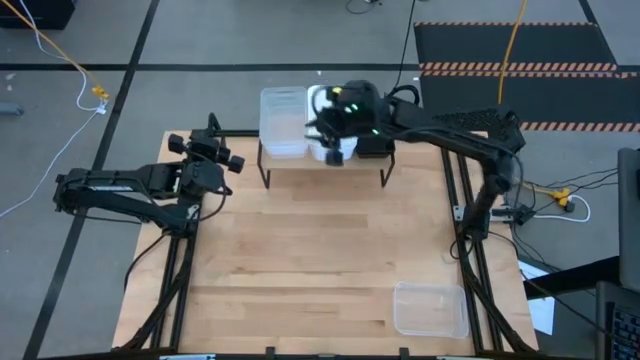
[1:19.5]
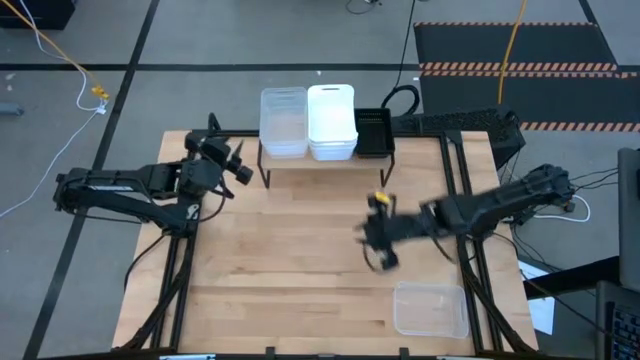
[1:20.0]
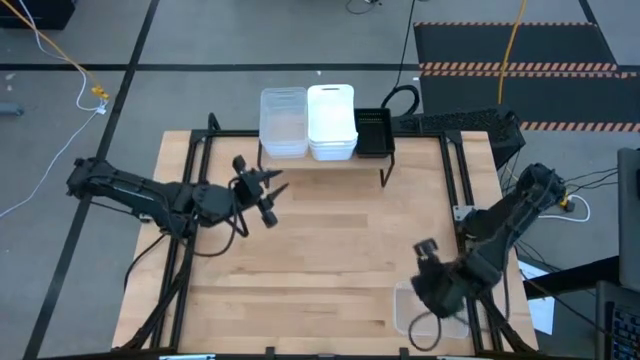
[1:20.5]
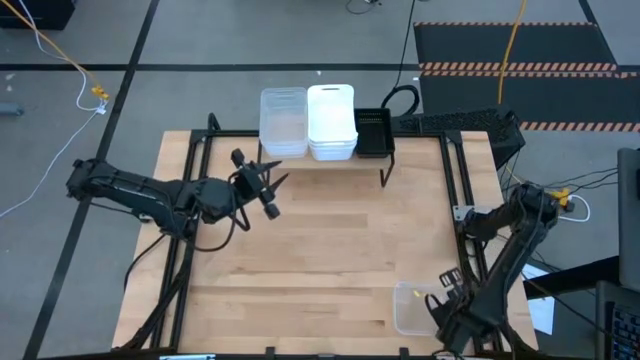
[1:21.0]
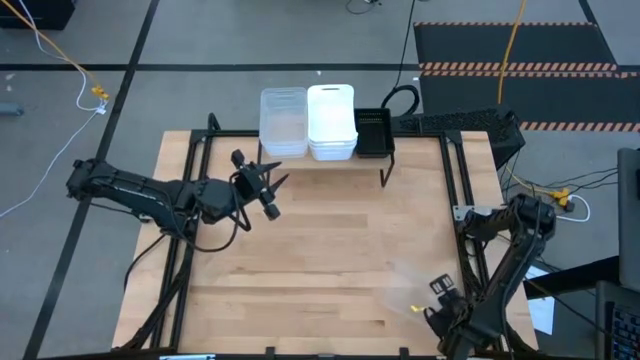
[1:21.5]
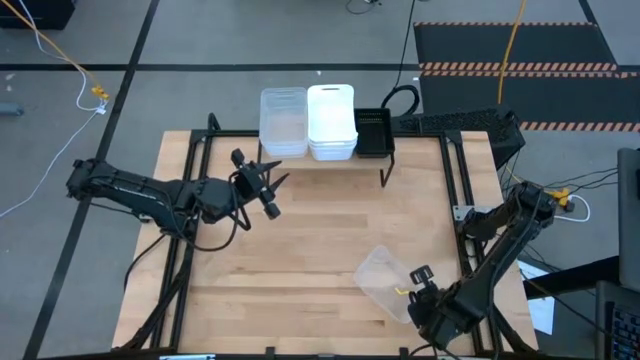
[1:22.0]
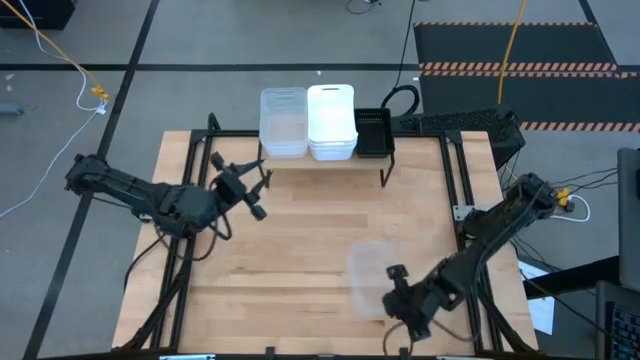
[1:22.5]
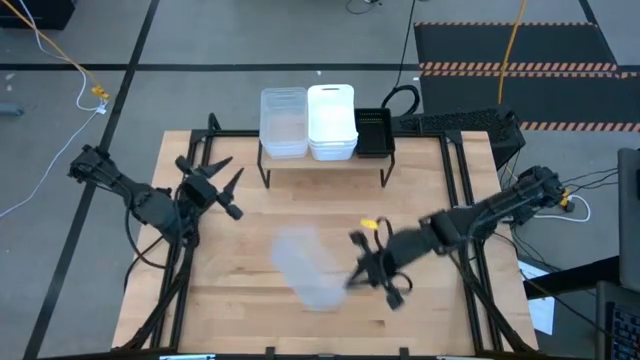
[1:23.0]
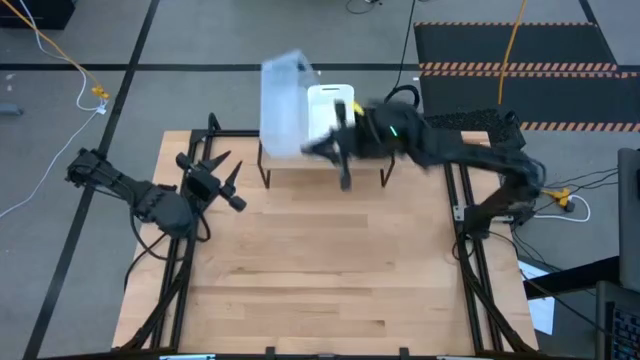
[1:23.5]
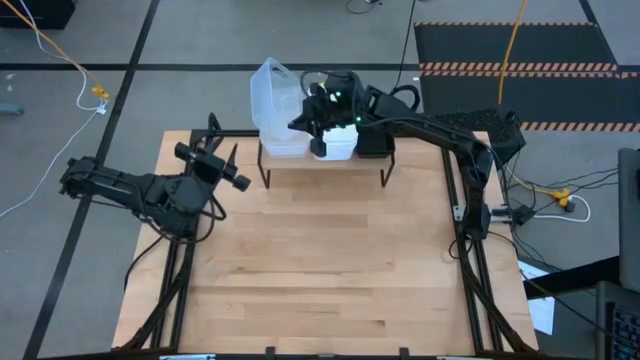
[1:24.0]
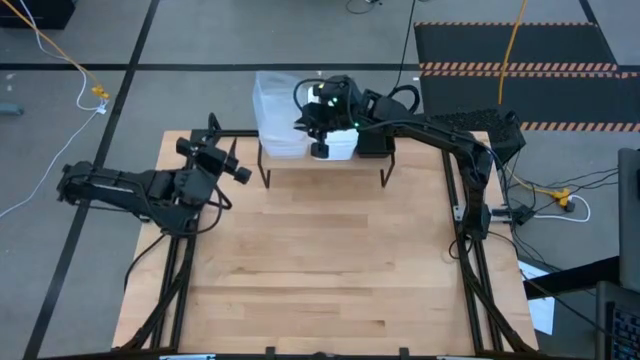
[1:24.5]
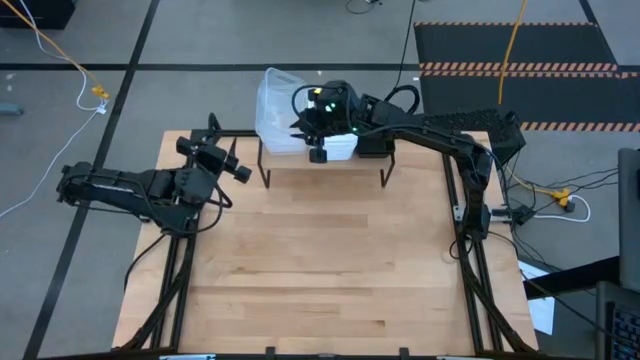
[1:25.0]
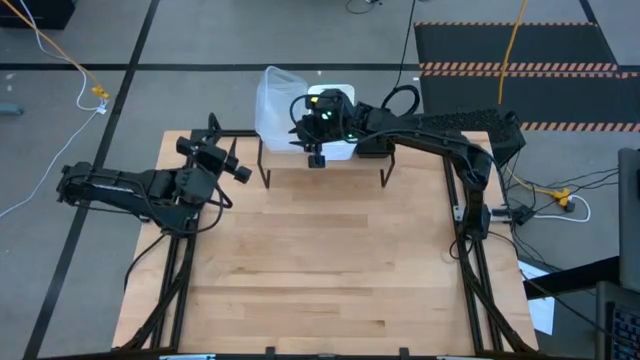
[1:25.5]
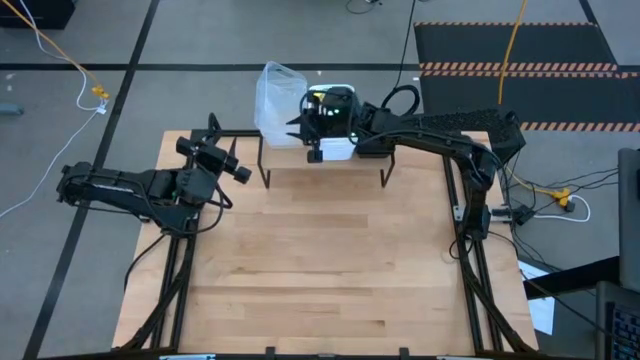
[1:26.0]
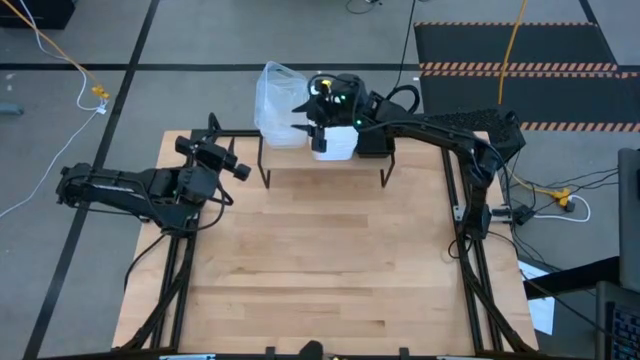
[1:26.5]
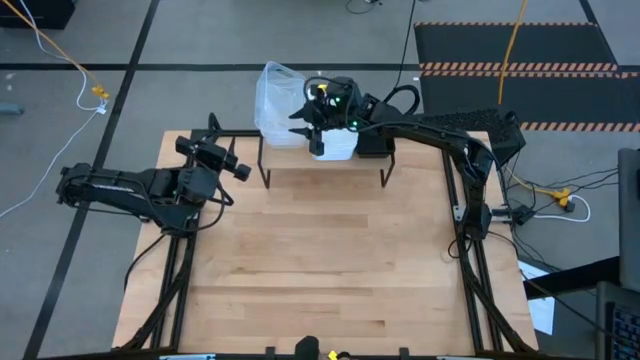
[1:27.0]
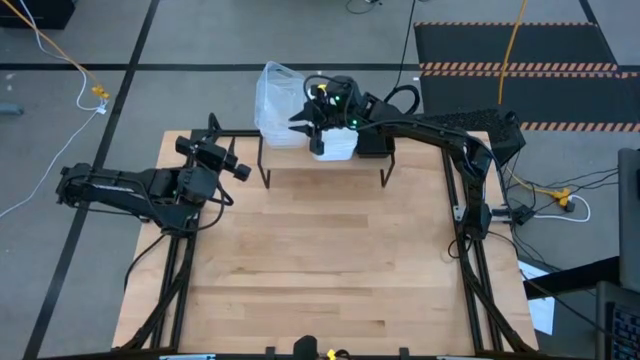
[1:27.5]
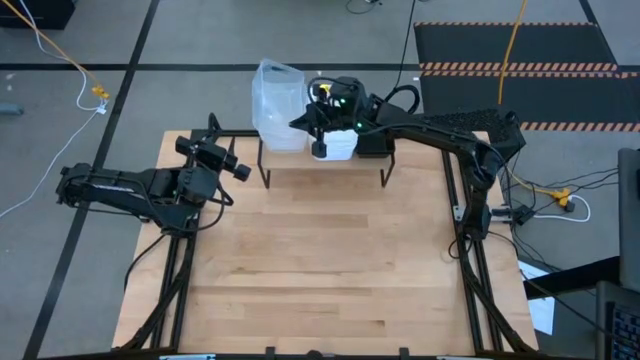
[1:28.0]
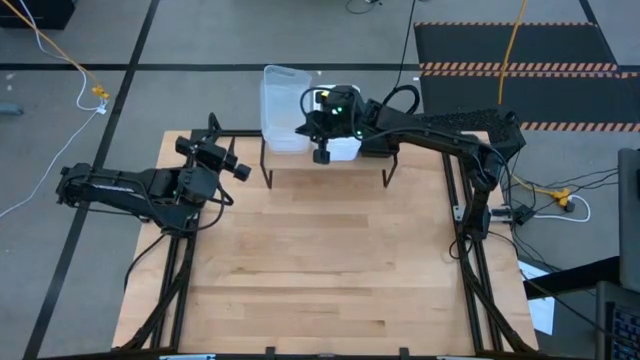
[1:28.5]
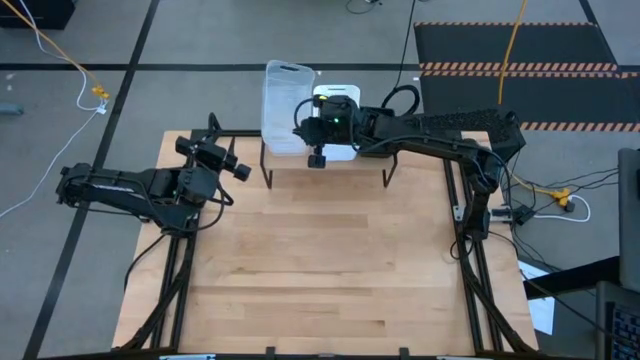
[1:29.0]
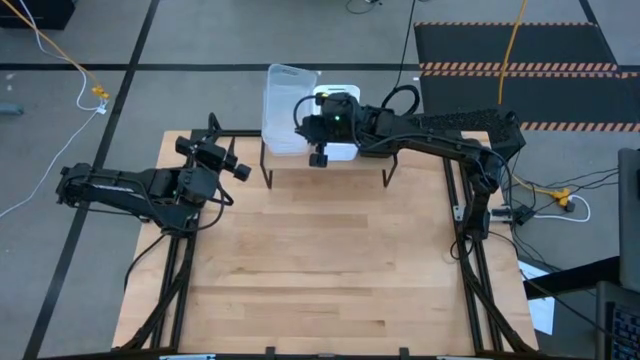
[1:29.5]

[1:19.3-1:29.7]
Task: Stack baskets on shelf by color
Stack the transparent bin on the transparent bin on the shelf

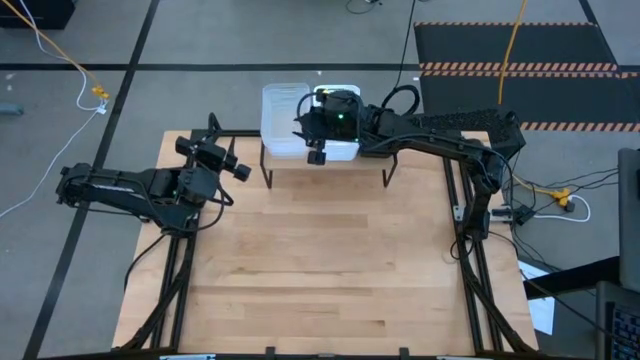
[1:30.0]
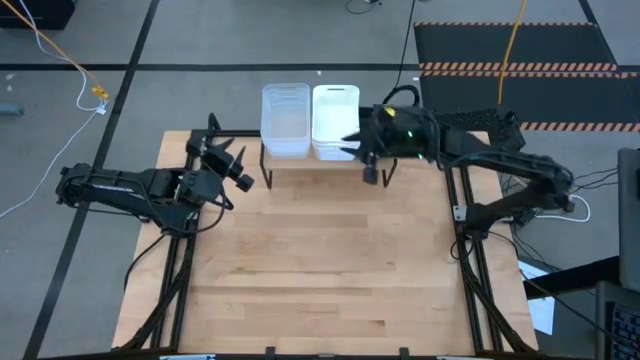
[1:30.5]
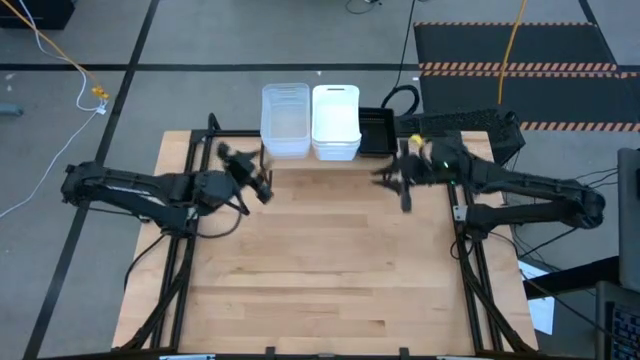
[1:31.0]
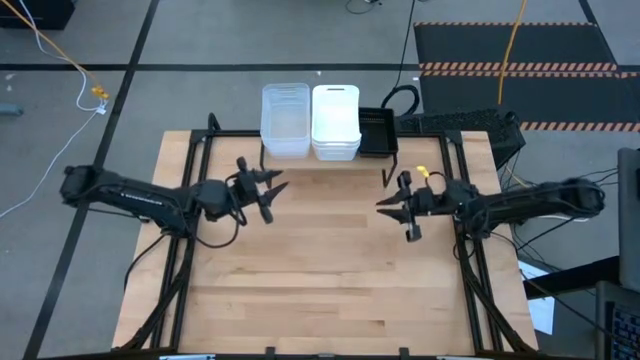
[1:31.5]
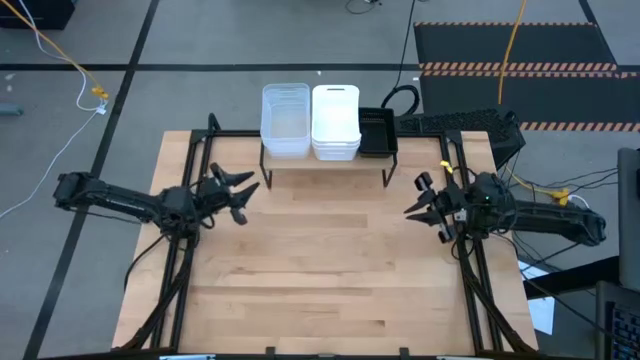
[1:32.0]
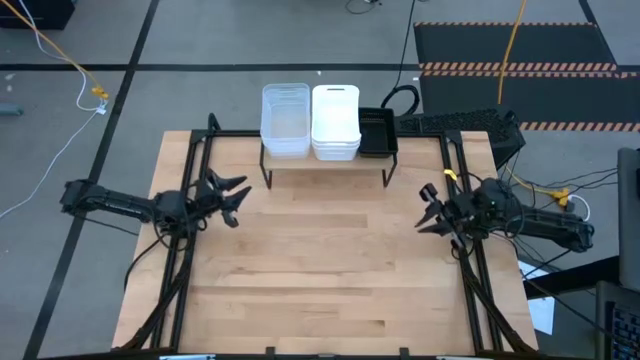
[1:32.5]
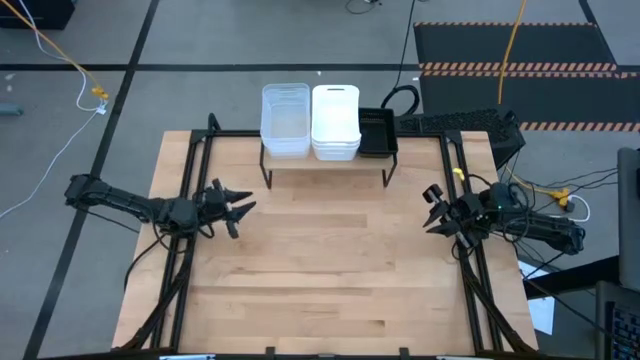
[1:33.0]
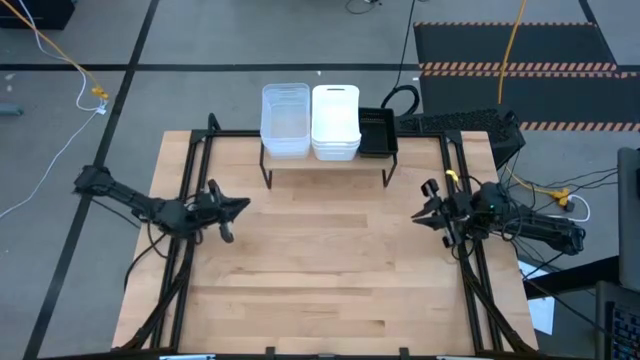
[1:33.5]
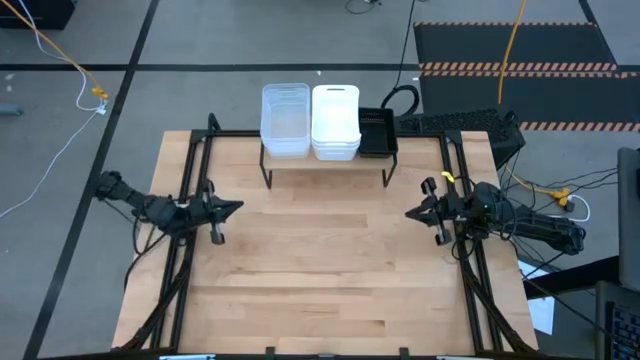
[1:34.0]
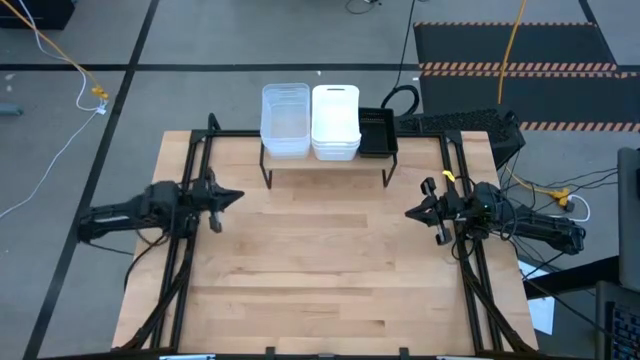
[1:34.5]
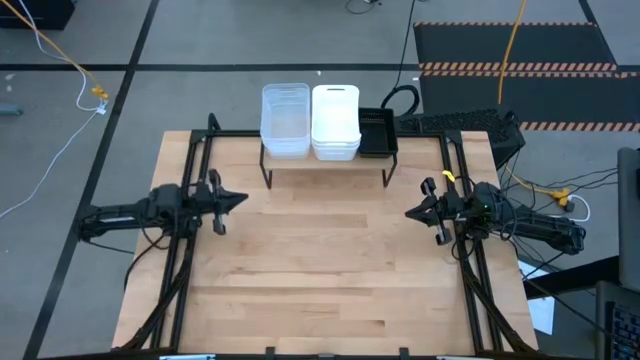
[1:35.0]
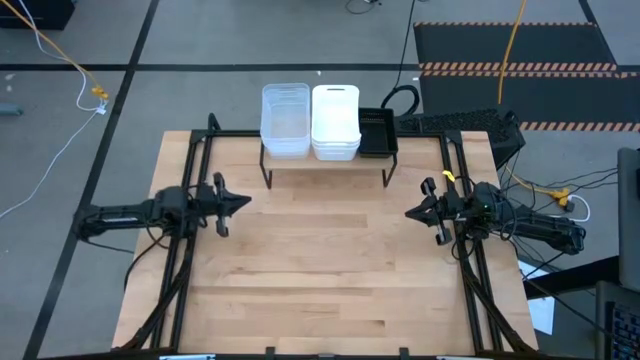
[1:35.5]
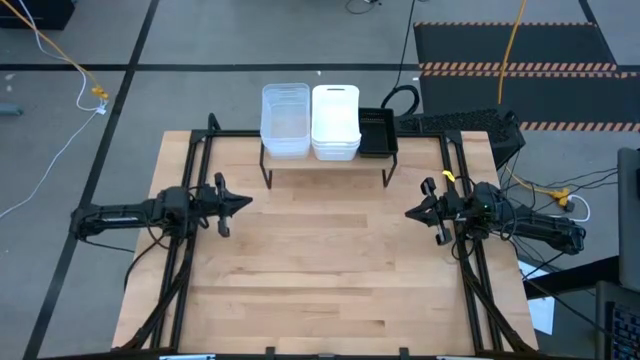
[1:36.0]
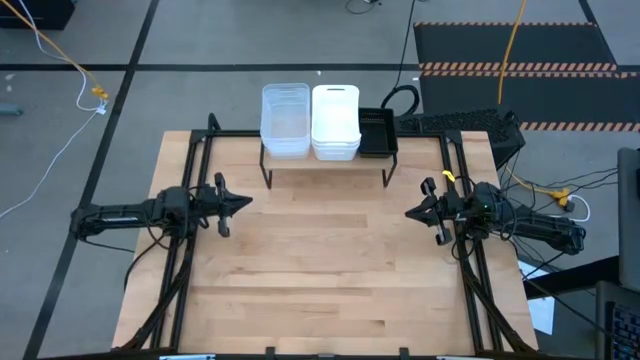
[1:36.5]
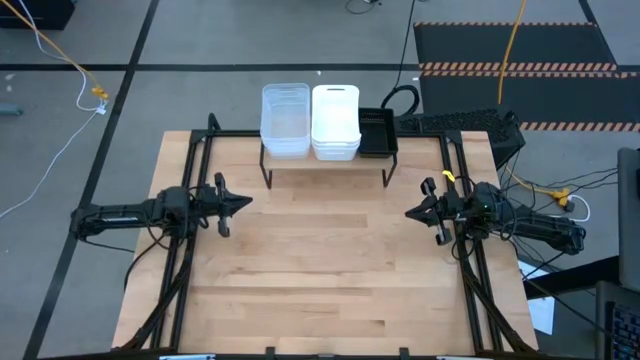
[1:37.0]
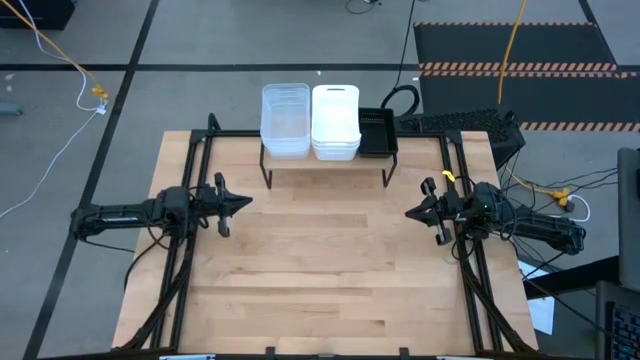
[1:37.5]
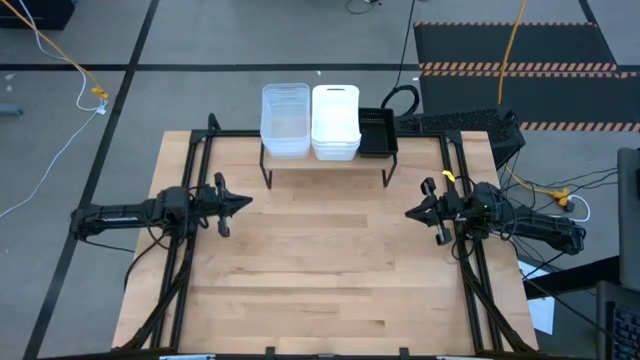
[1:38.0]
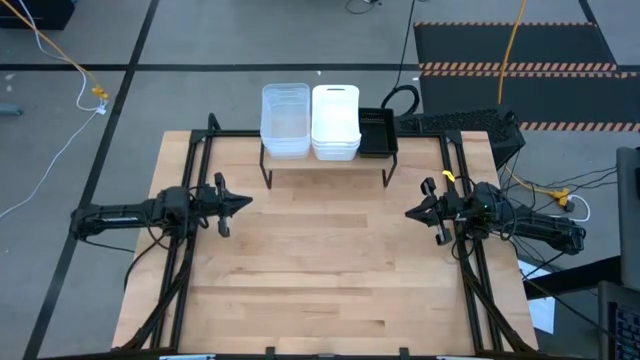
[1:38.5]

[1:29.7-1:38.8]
Return to Home Position

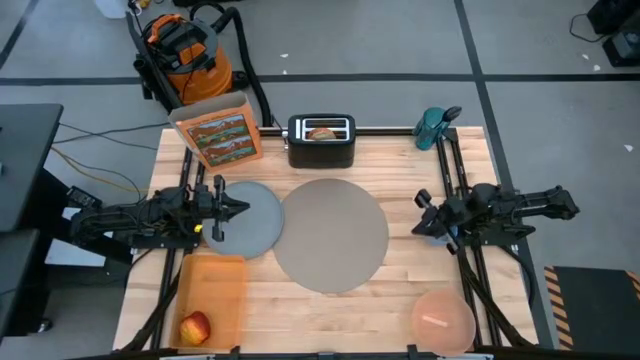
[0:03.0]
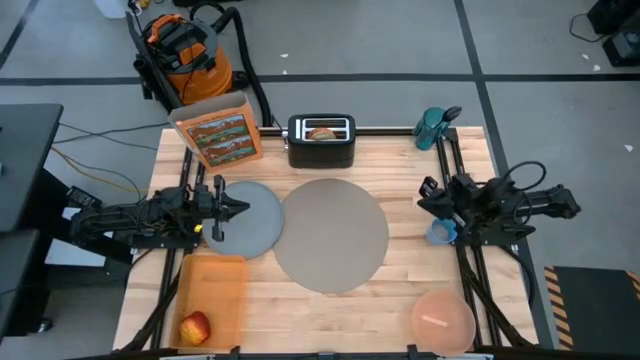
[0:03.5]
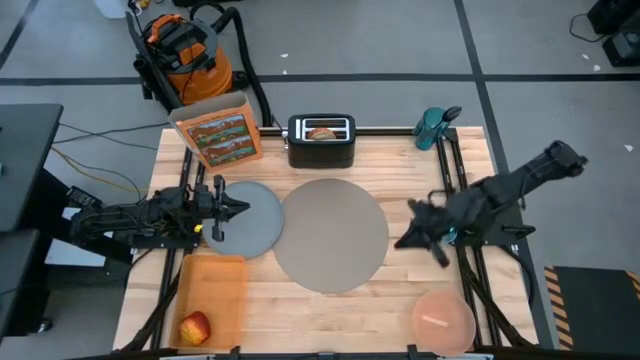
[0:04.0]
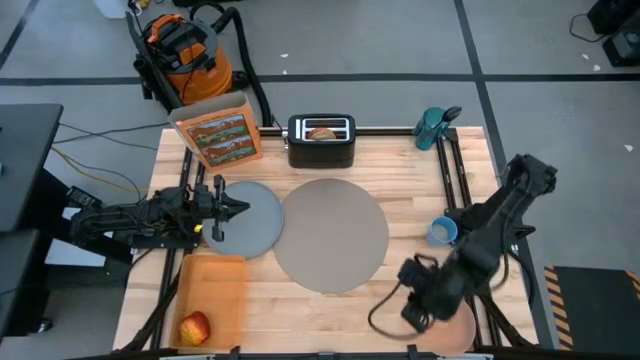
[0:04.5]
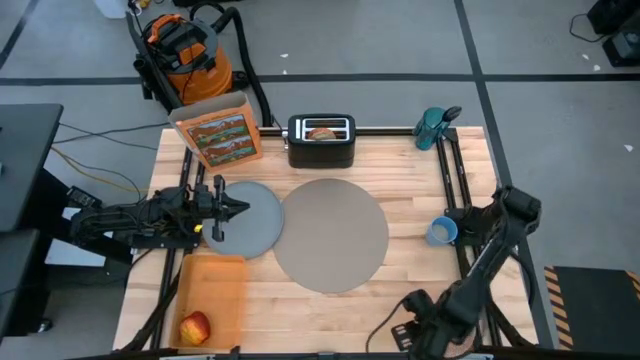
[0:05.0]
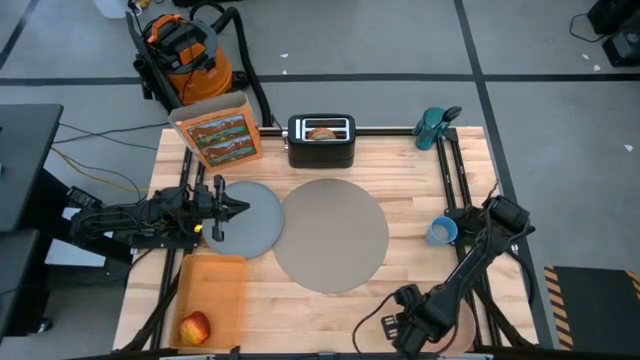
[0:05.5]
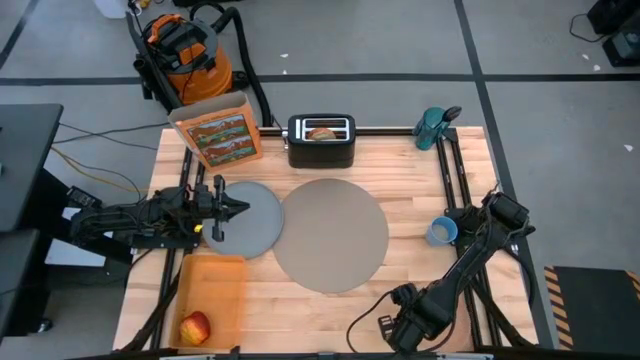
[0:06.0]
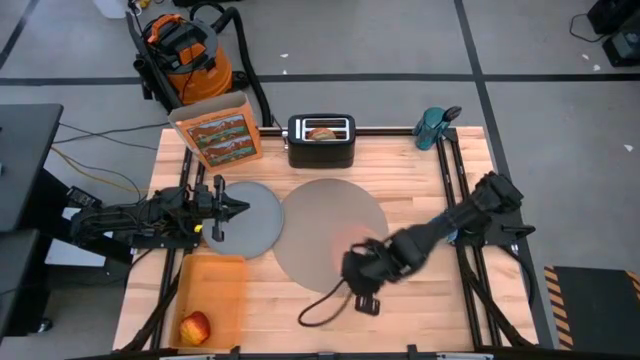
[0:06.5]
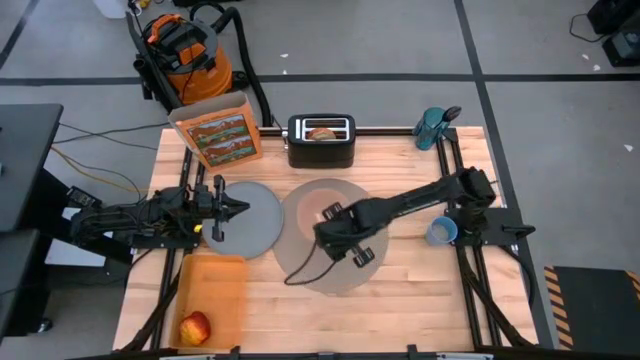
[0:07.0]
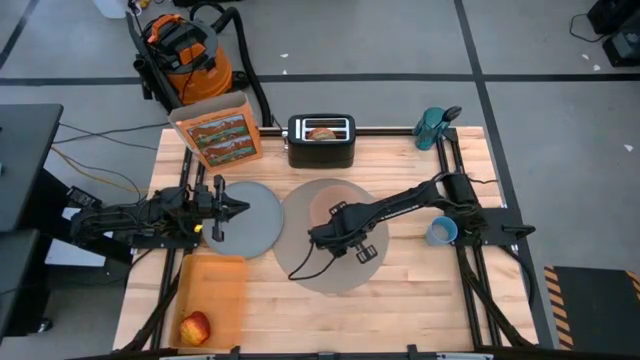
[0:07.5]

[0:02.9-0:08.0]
Task: Arrange a breakfast setting
Put the light orange bowl on the gray placemat
